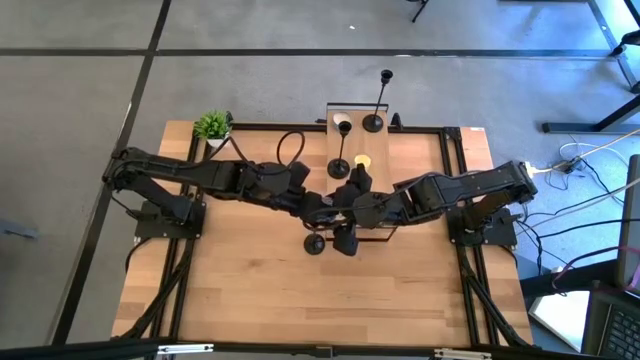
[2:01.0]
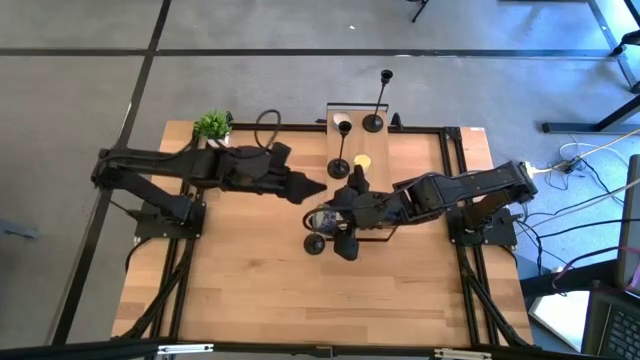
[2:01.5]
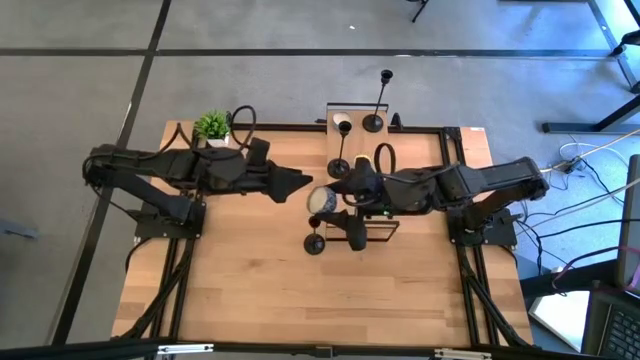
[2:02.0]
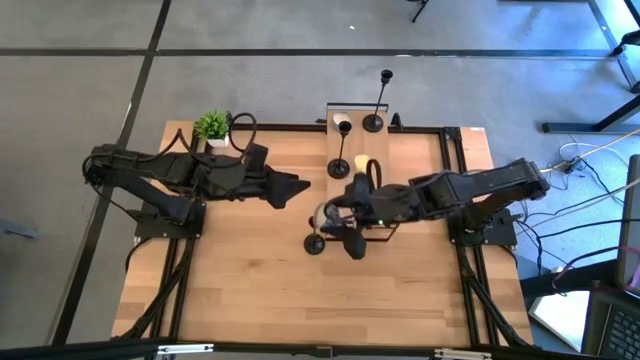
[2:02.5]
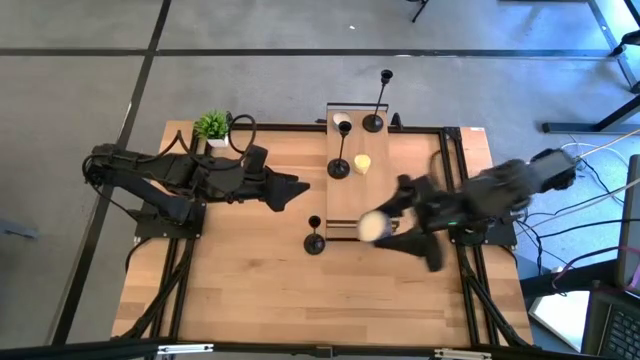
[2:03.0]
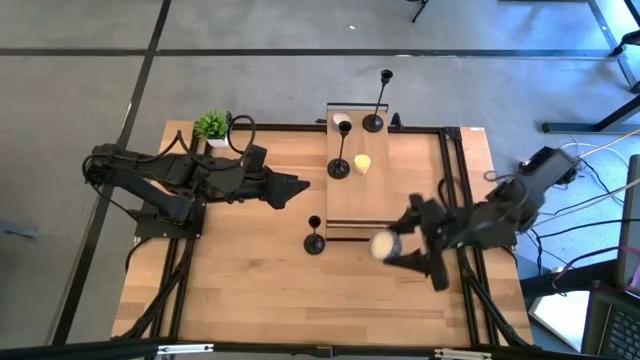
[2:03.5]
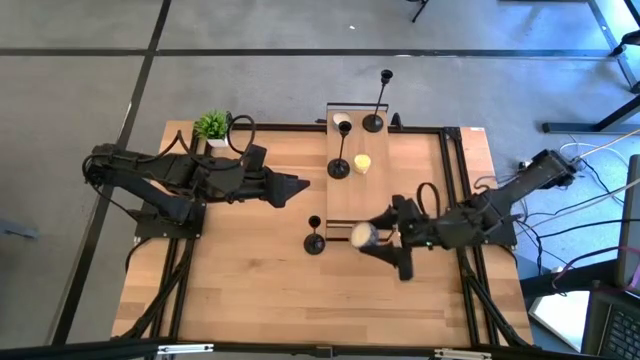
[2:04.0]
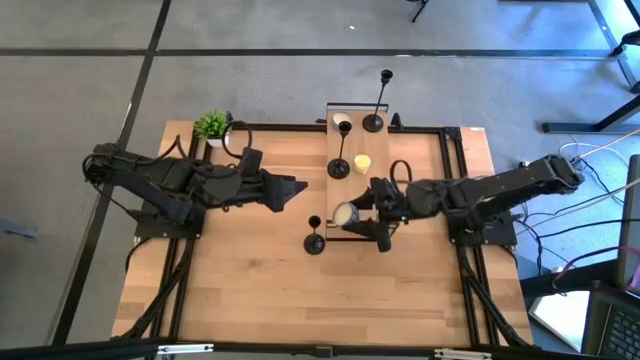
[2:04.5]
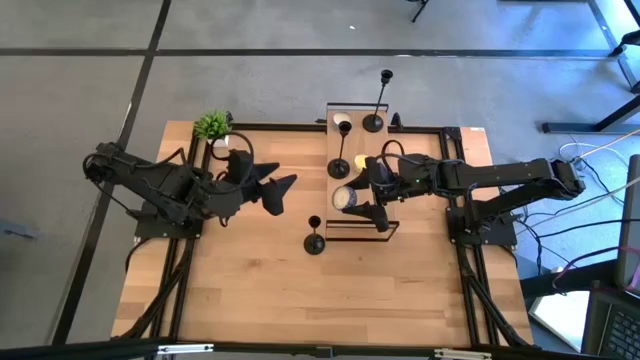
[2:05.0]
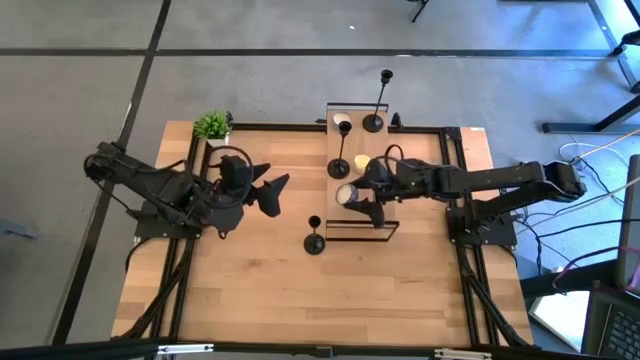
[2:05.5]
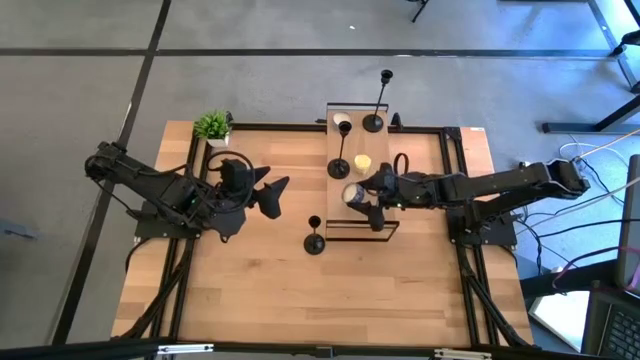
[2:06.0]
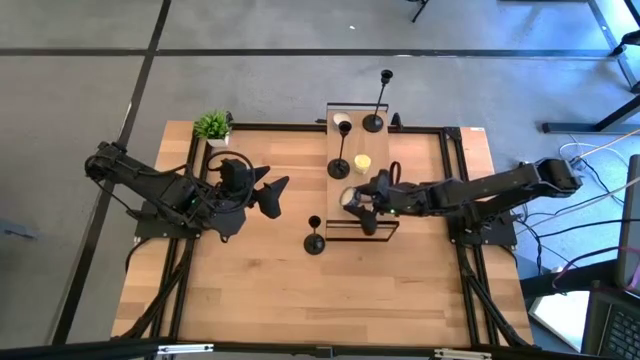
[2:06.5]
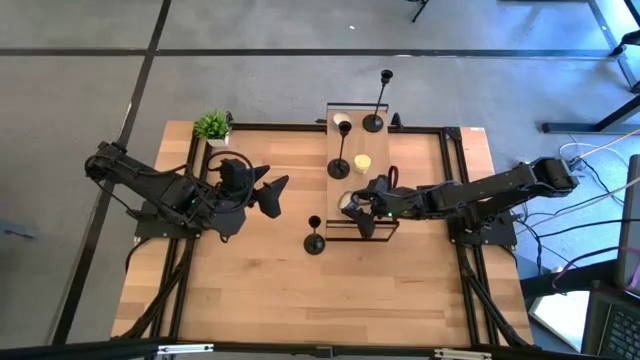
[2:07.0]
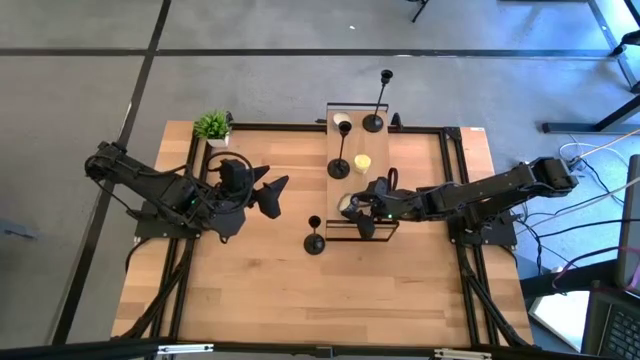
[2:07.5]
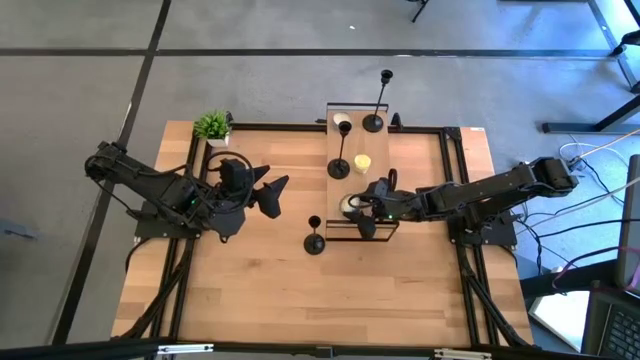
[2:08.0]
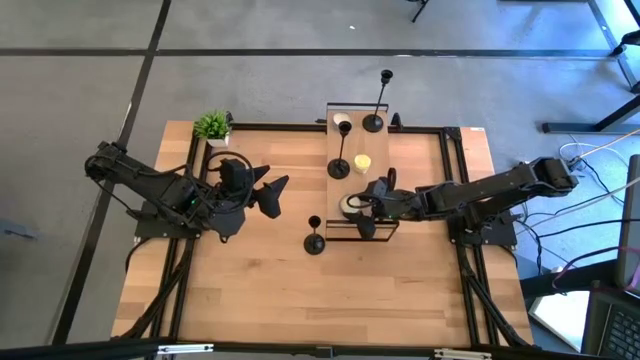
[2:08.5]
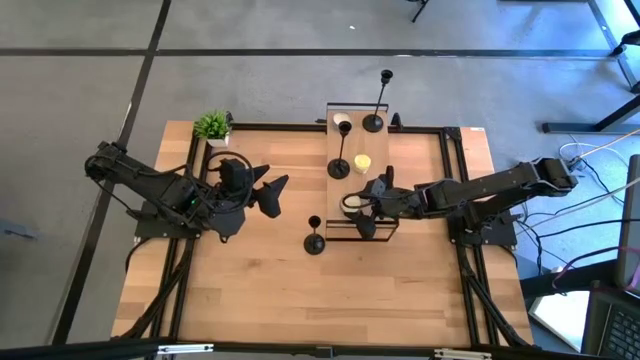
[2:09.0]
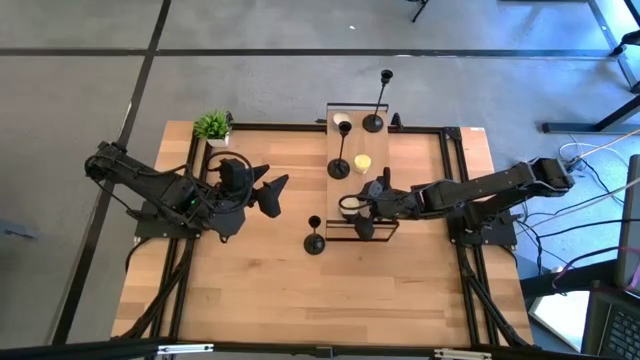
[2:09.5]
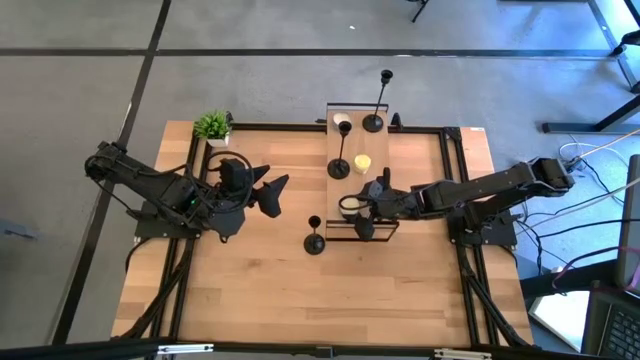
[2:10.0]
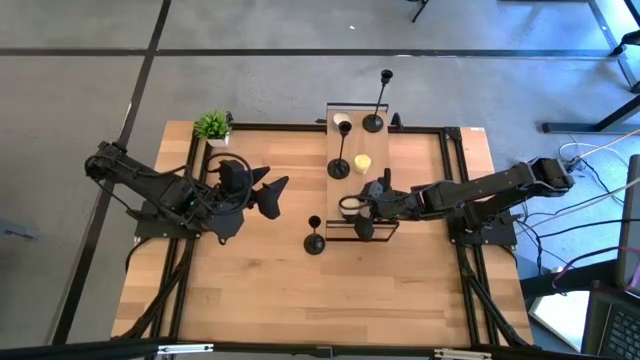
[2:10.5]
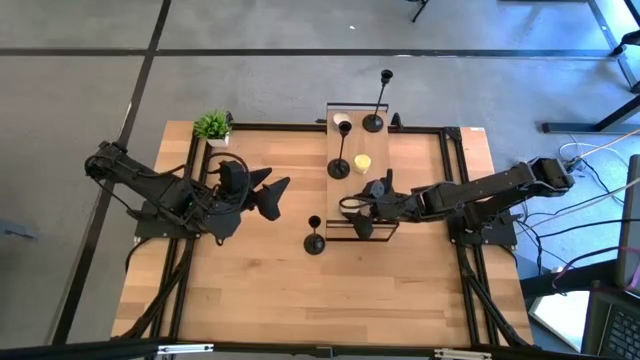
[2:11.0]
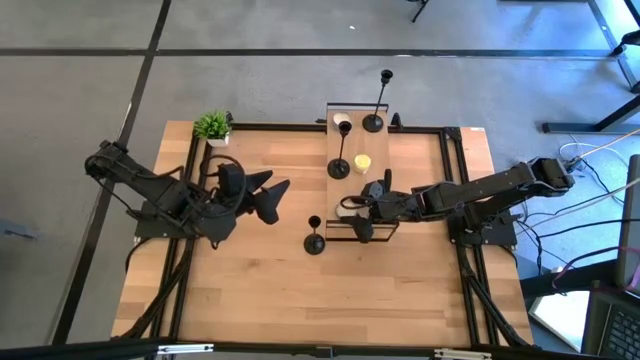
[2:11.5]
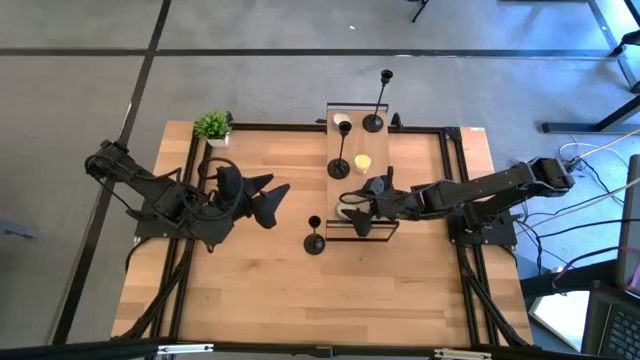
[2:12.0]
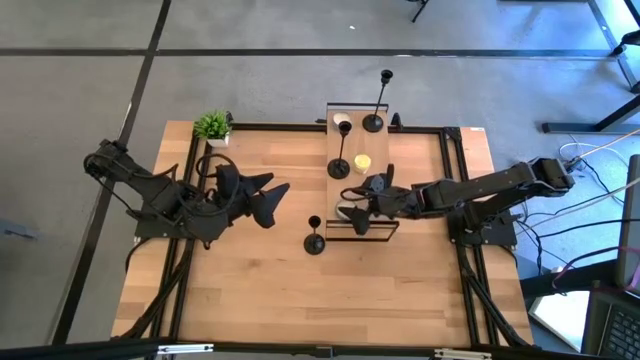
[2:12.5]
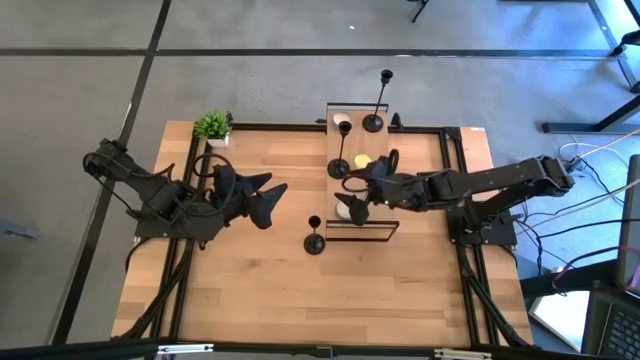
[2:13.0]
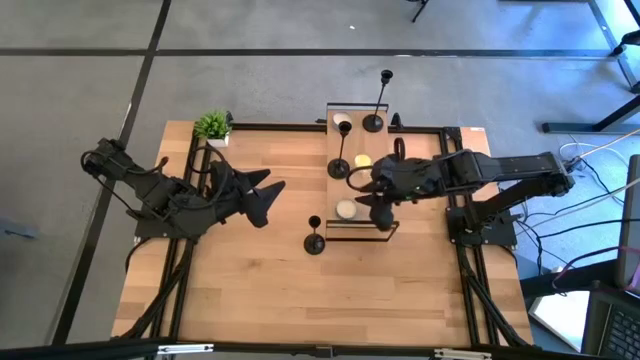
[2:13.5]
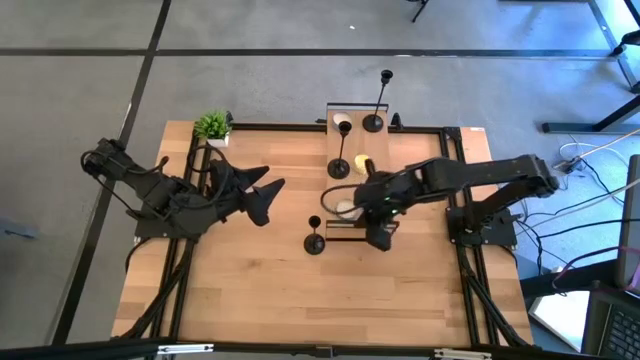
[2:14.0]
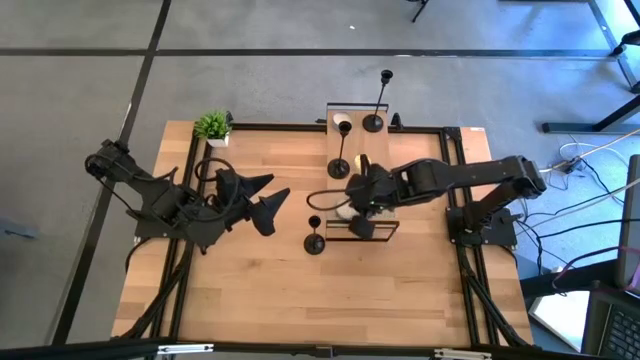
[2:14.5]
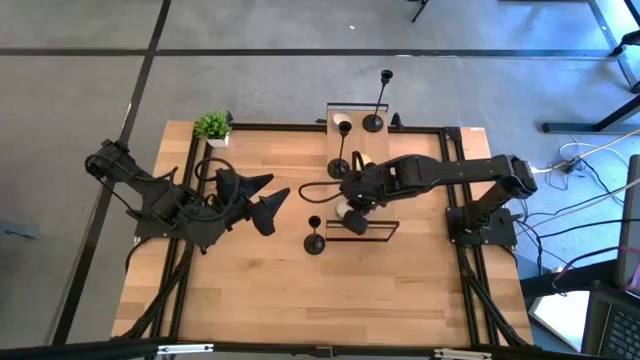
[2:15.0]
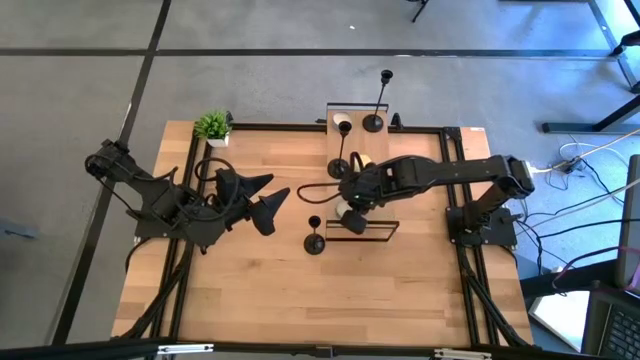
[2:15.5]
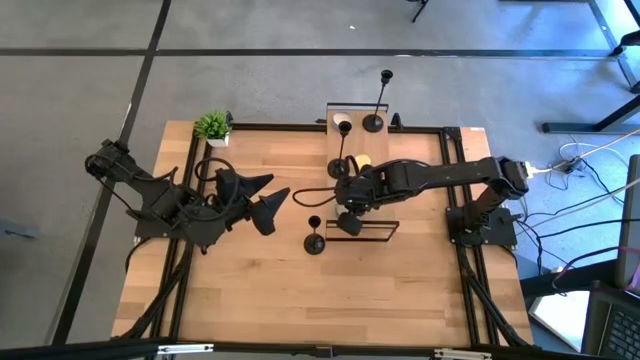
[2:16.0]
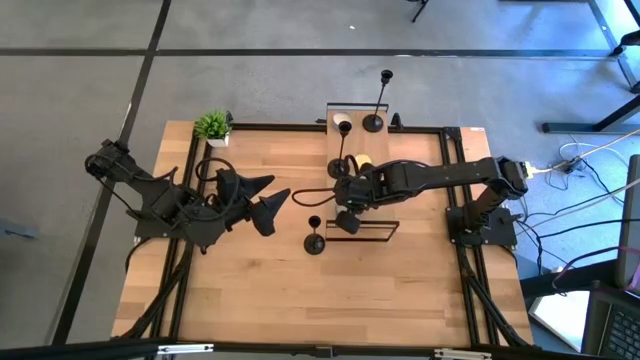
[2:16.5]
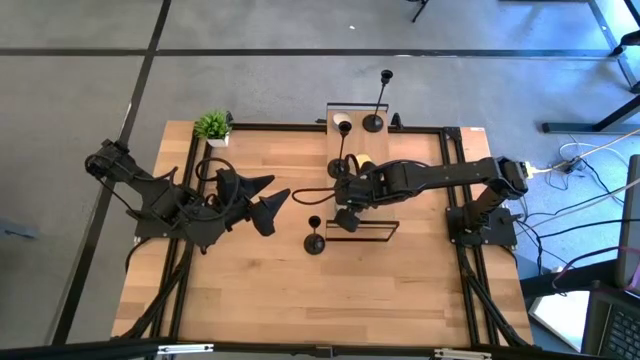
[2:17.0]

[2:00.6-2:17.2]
Task: Pick & Place candle stick holders
Put the blue candle jar in the bottom left corner of the shelf

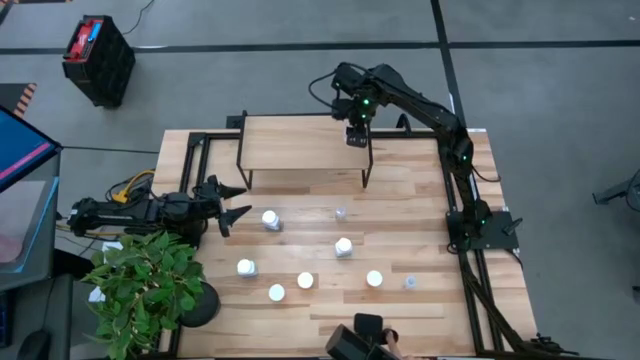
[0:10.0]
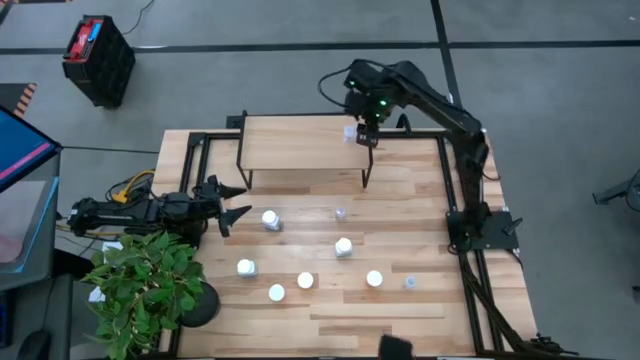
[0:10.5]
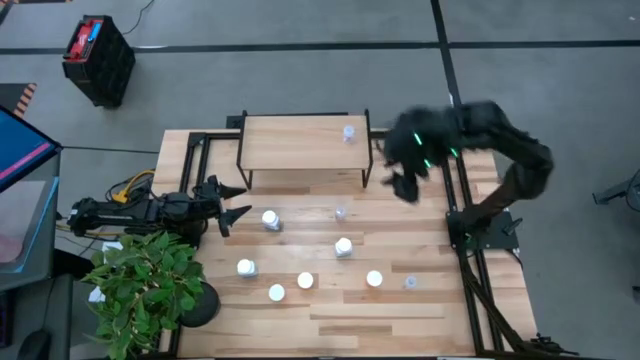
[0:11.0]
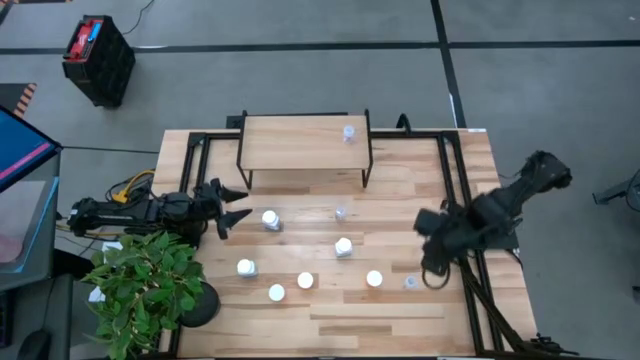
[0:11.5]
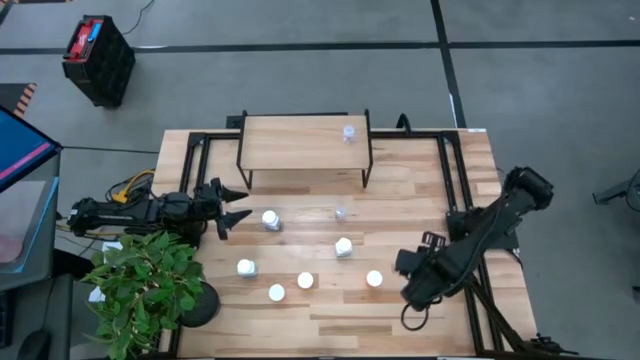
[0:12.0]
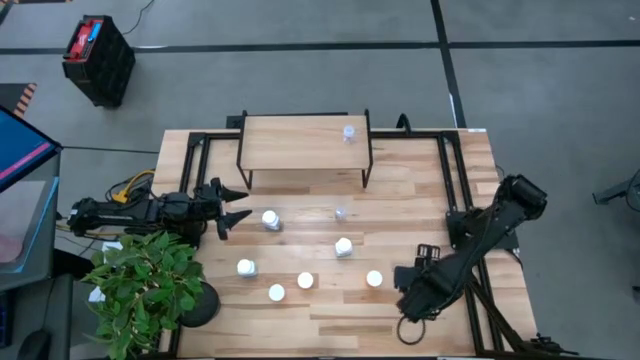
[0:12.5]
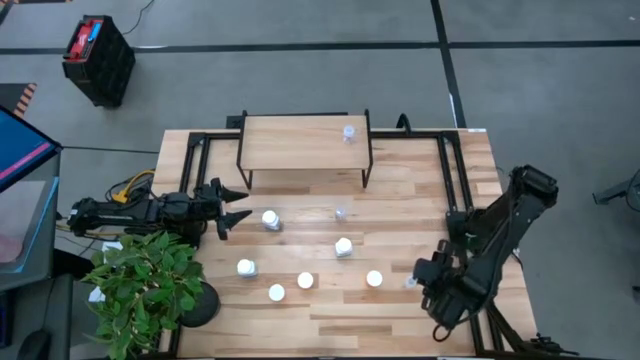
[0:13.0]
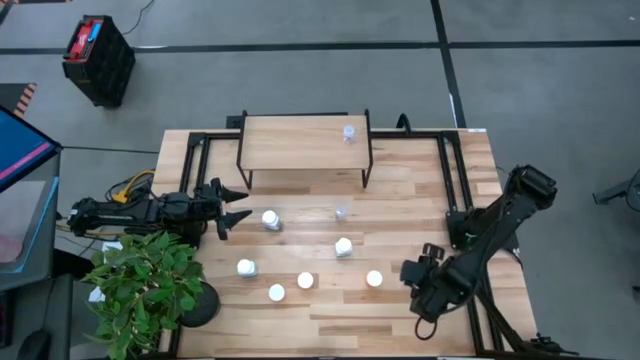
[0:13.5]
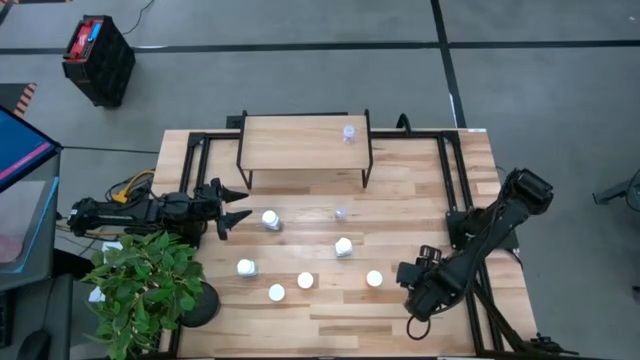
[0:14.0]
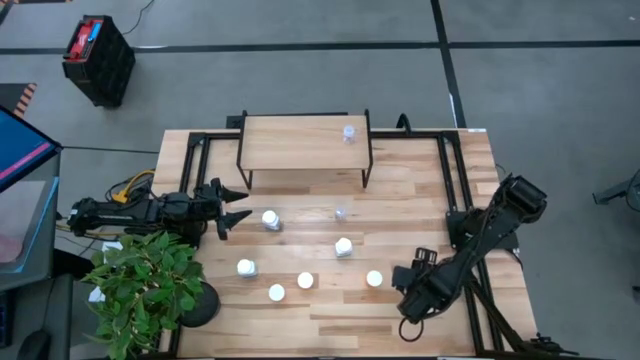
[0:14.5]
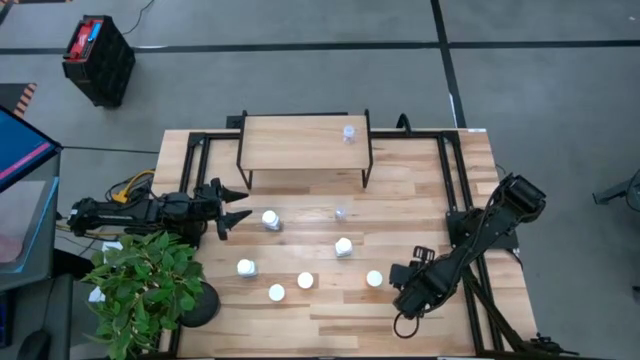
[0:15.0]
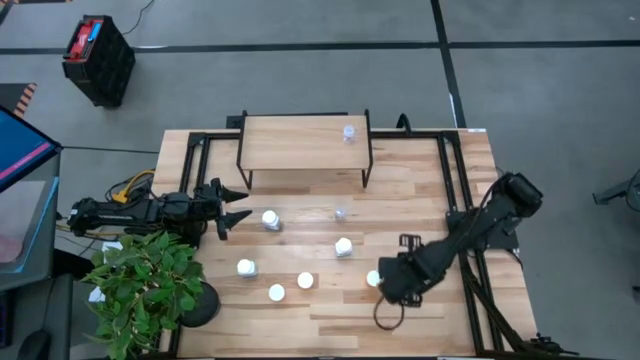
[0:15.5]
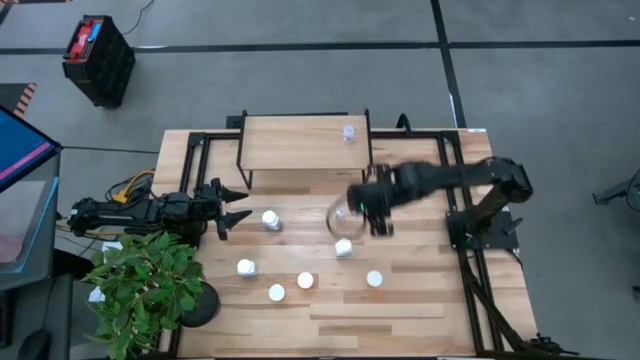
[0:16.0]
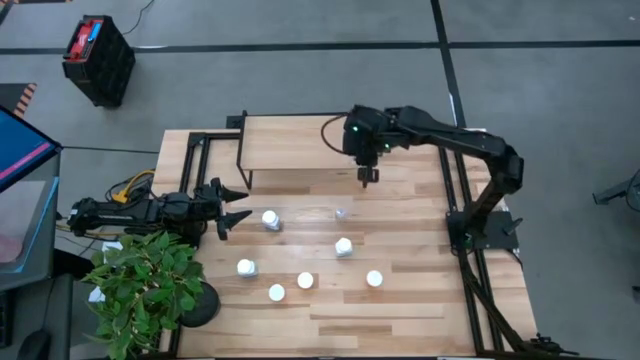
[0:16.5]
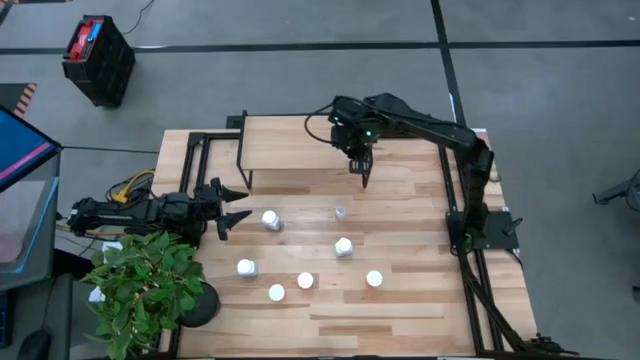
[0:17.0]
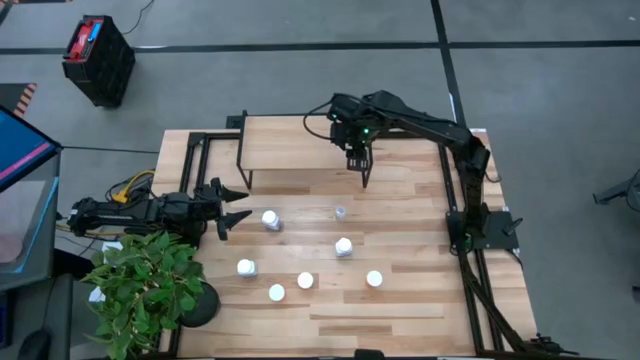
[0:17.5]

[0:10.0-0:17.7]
Task: Pick and place medicine bottles onto shelf by color
Put the bottom transparent pill bottle on the shelf aligned with the other transparent pill bottle
